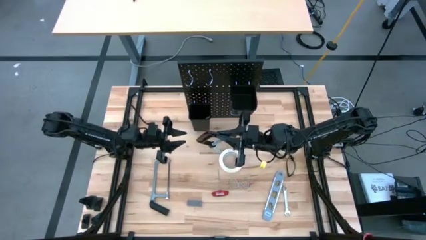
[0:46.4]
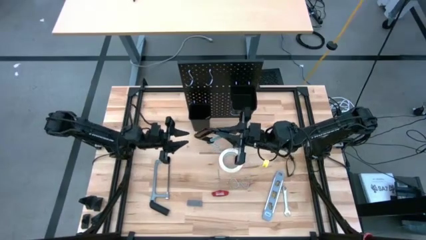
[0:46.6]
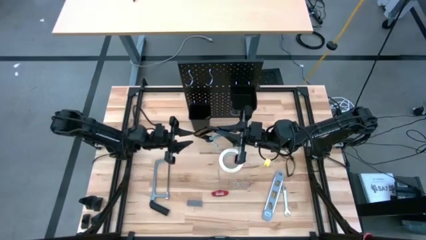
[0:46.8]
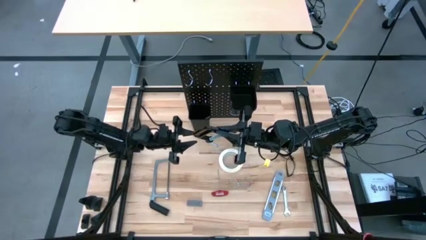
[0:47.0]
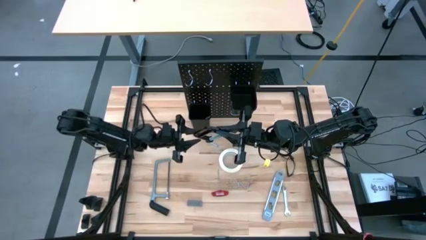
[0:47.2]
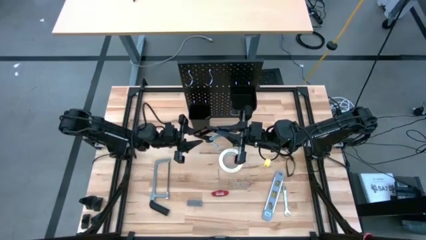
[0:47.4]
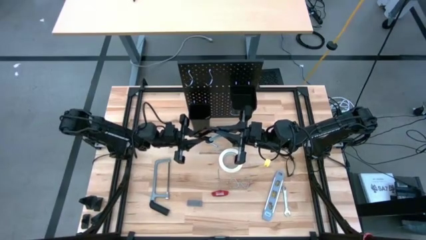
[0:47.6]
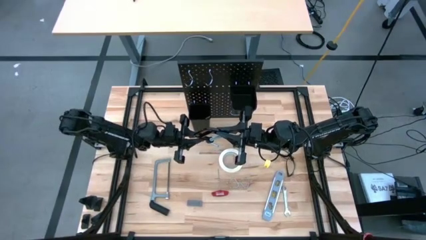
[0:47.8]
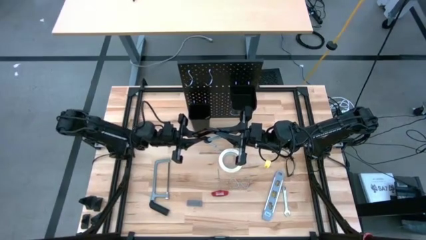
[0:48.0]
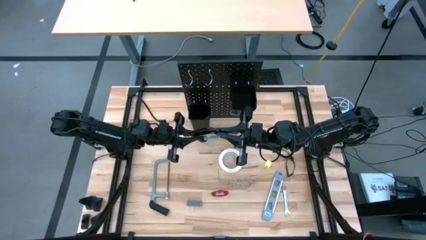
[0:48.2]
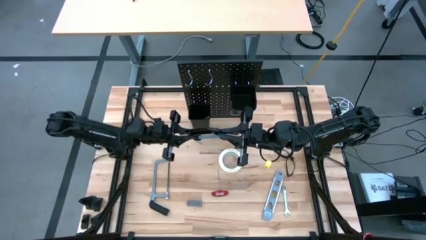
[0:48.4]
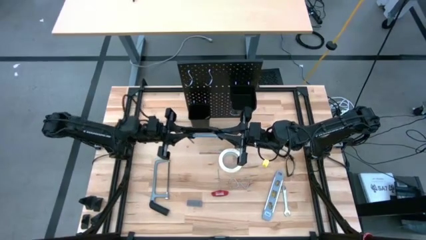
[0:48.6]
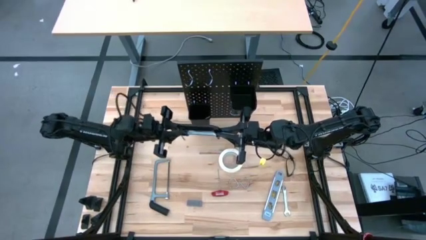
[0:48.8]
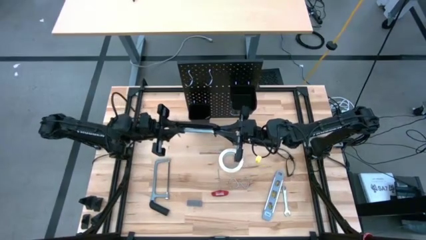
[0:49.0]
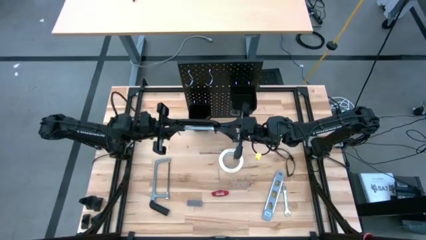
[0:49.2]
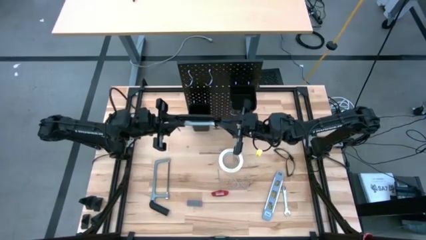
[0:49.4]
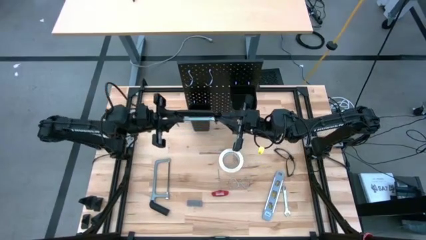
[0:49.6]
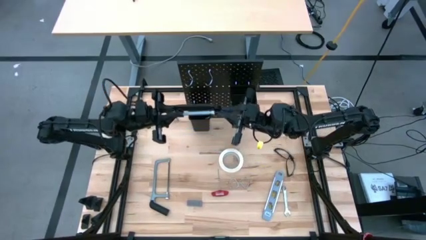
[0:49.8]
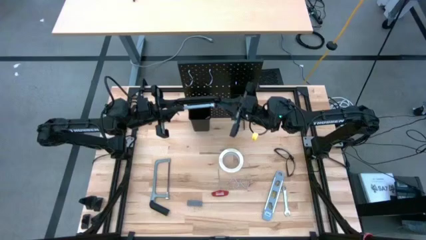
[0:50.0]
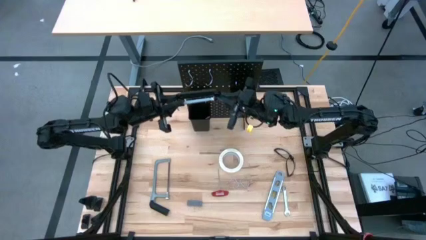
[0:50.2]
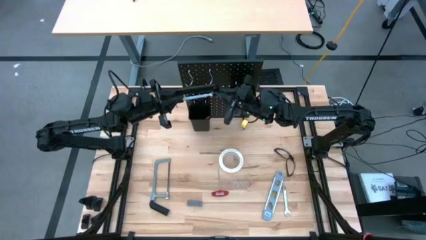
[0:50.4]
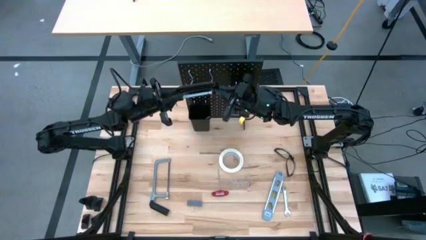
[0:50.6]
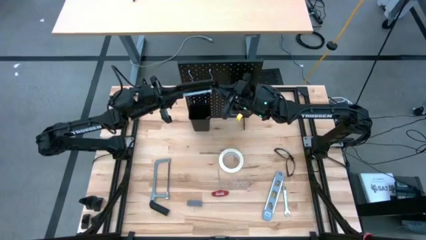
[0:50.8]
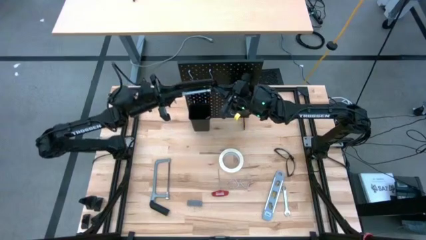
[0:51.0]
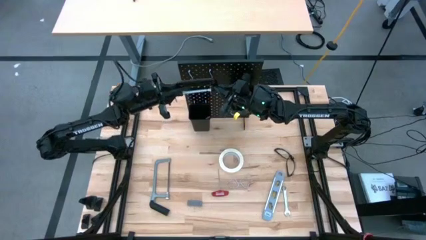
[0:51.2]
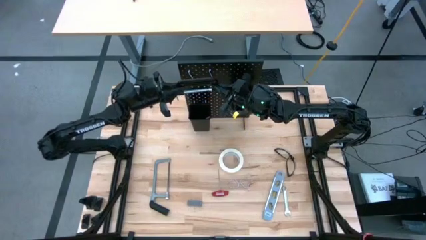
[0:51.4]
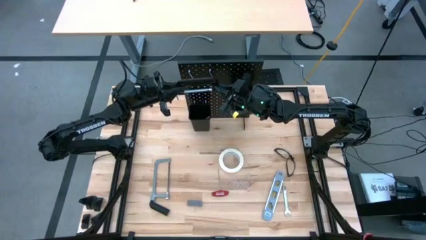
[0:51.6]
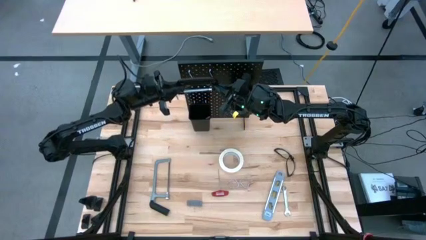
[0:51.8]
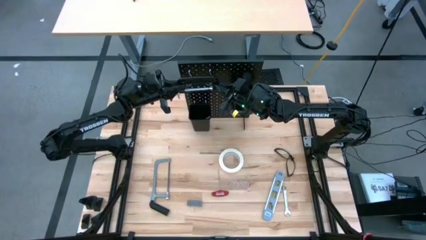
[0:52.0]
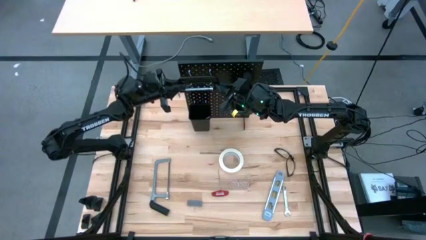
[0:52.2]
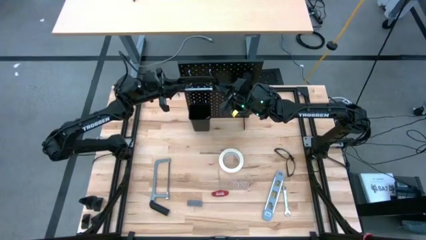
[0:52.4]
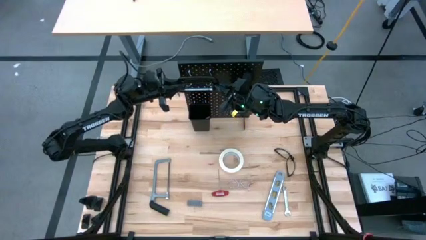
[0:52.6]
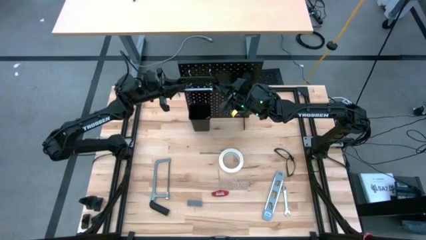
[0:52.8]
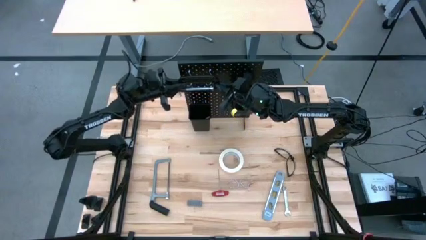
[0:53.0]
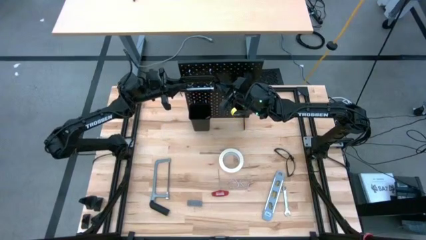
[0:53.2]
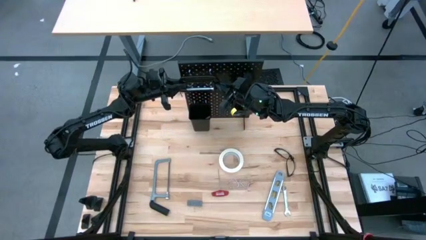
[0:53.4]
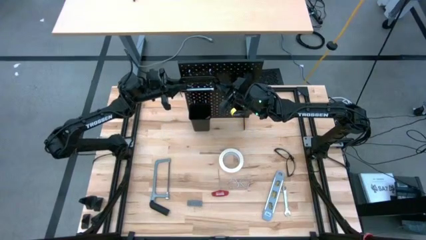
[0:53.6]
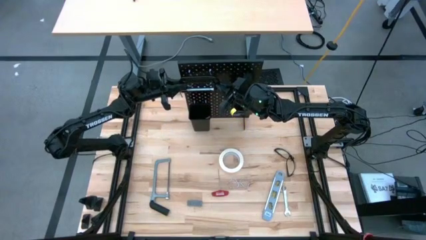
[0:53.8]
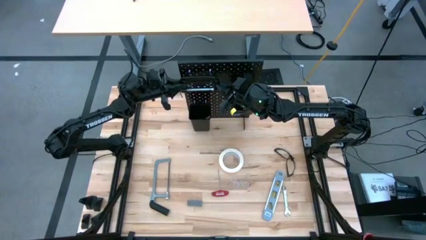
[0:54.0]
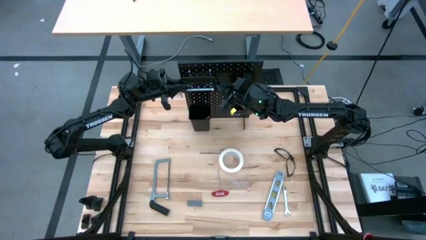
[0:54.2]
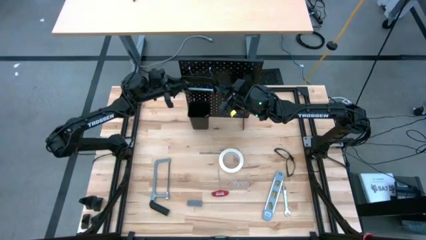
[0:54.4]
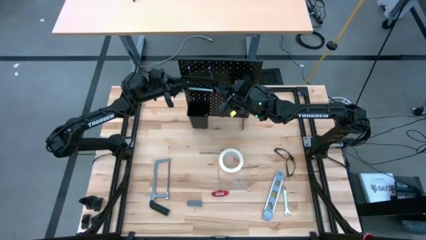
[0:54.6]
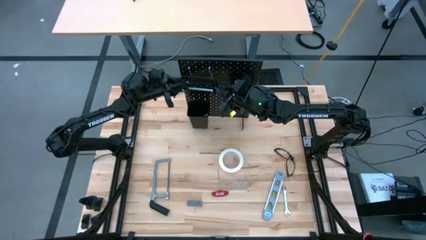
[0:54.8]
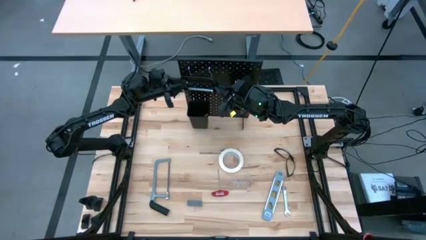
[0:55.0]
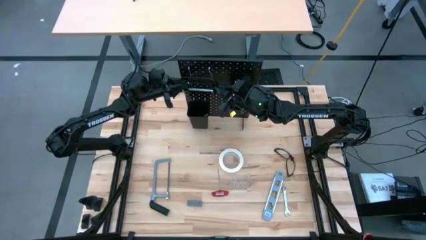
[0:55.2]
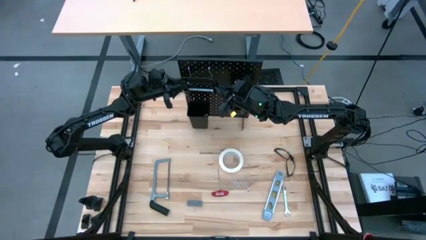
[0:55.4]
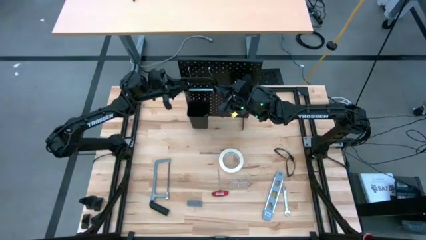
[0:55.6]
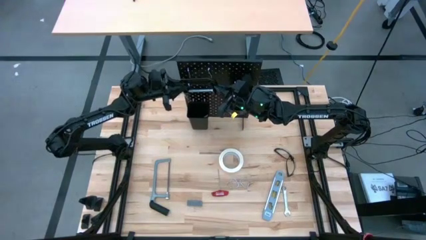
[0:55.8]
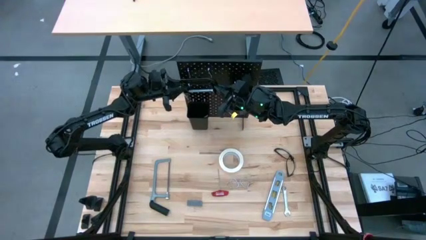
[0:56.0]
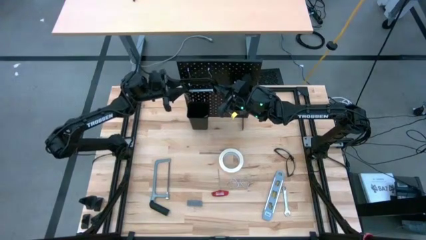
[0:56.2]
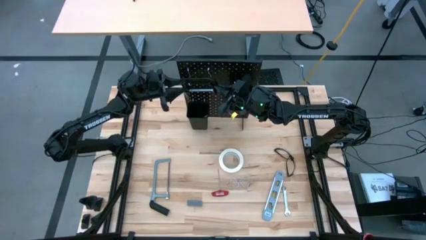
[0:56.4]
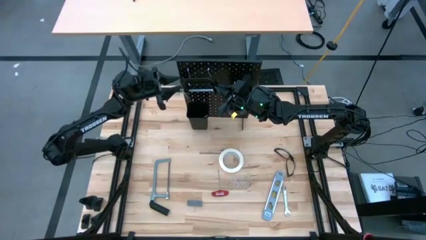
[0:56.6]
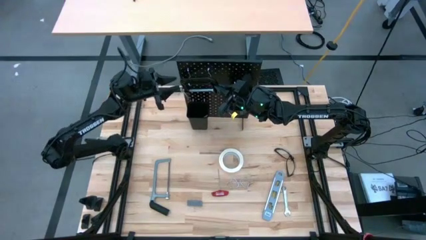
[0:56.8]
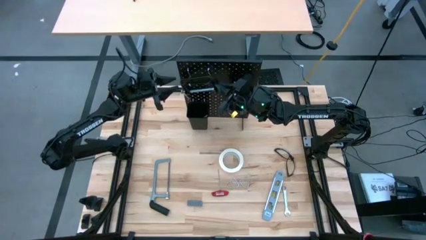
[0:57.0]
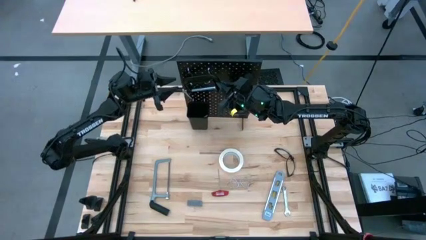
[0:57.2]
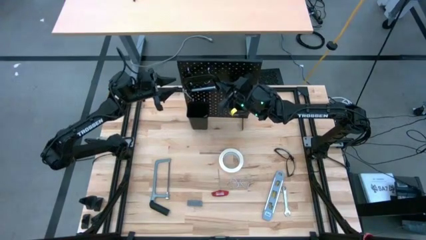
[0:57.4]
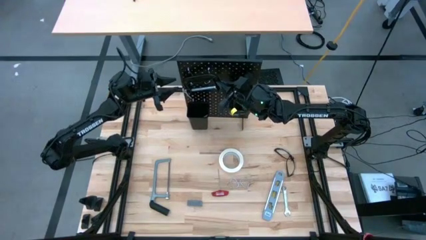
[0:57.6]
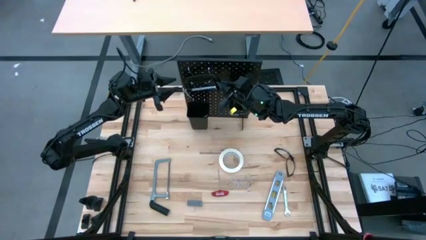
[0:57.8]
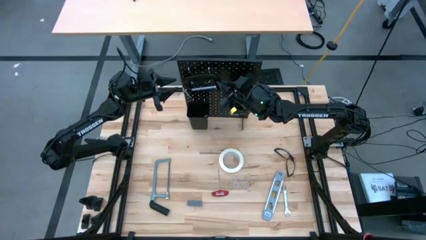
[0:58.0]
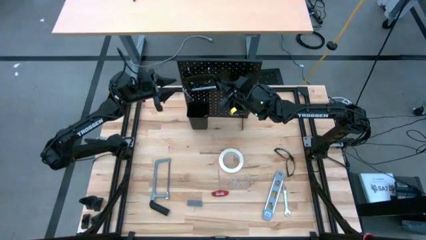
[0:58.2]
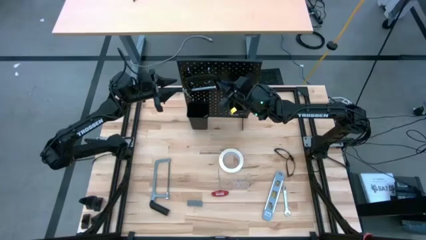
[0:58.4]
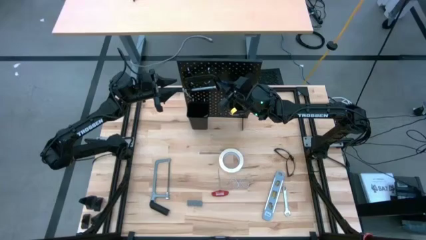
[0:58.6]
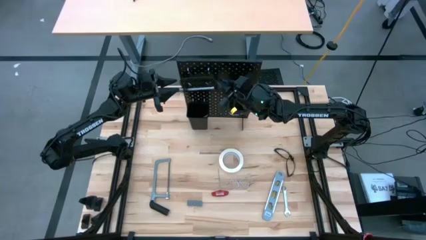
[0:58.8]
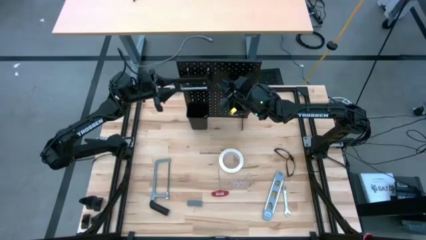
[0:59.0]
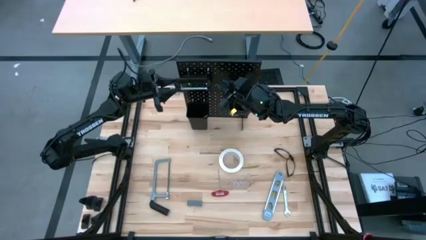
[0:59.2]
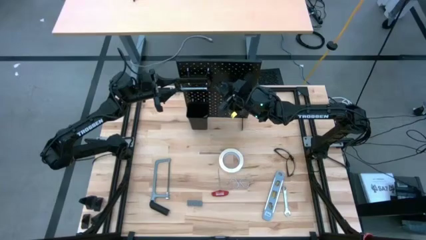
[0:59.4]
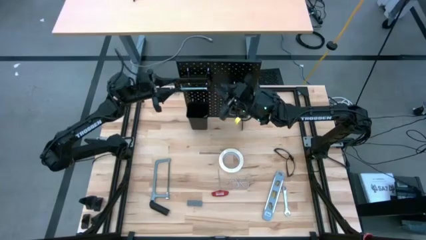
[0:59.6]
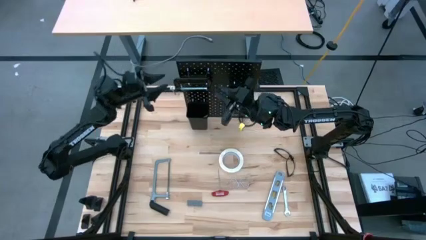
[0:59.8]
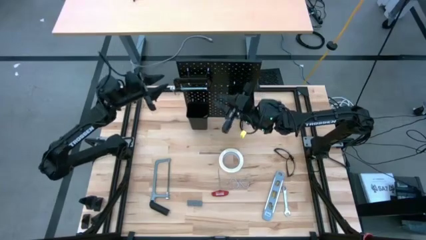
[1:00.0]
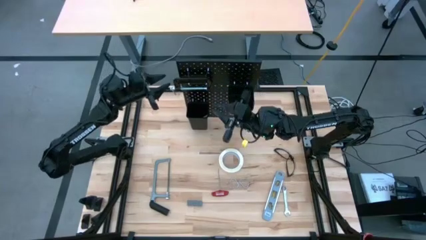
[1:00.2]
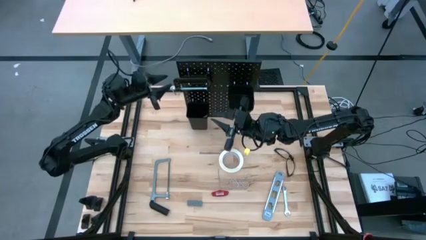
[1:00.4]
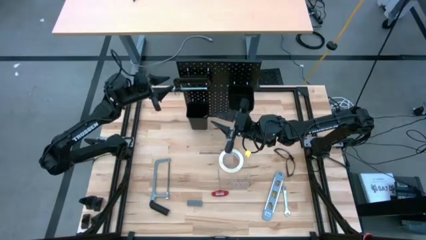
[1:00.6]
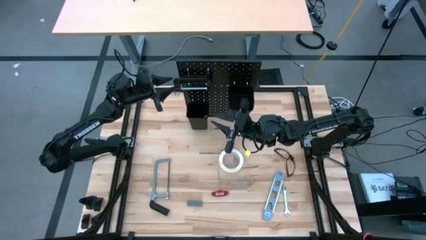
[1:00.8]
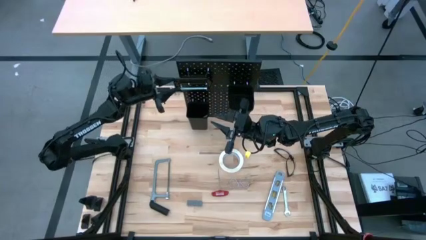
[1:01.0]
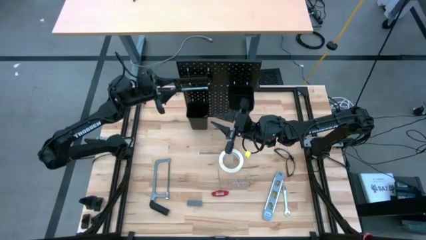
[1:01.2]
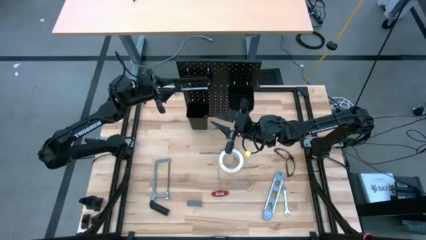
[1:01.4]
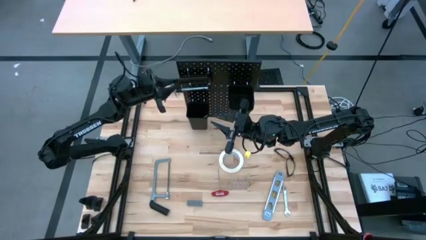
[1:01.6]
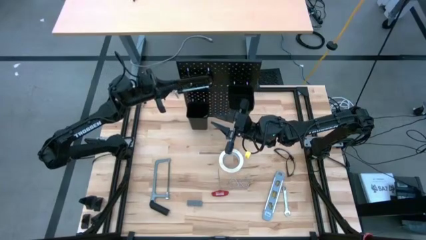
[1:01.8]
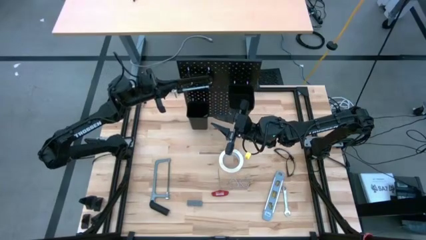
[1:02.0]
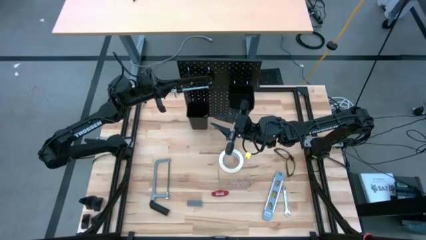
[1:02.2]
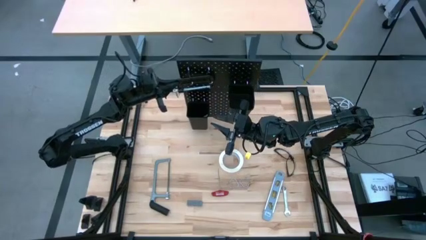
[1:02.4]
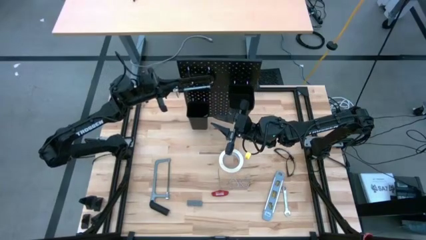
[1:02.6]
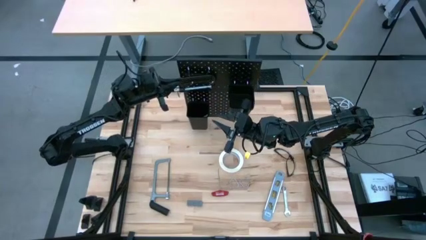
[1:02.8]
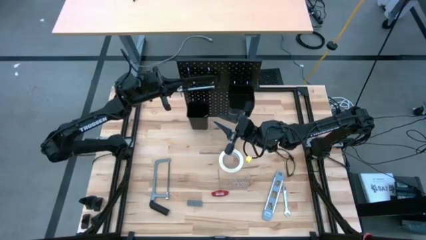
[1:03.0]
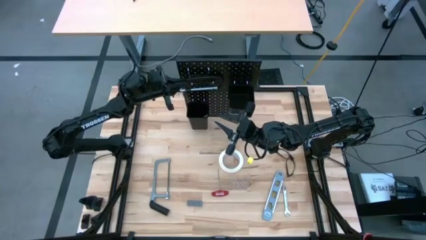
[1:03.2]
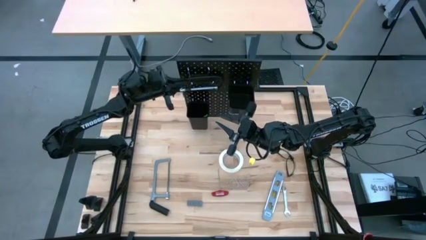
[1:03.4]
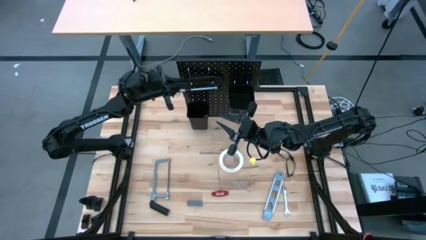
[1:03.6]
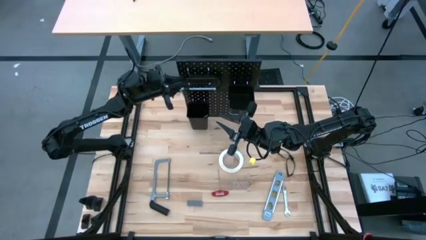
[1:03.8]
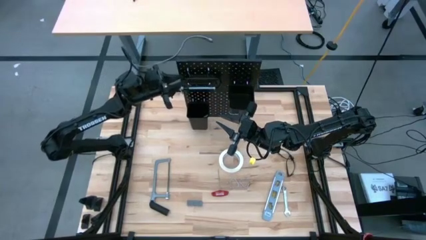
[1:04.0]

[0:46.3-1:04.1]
Task: Hang tools onto peg board
Hang the black c clamp on the black peg board
